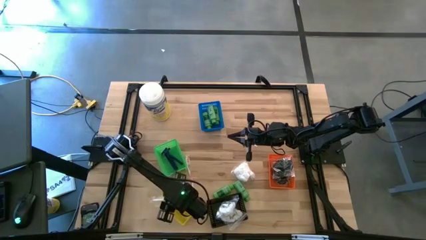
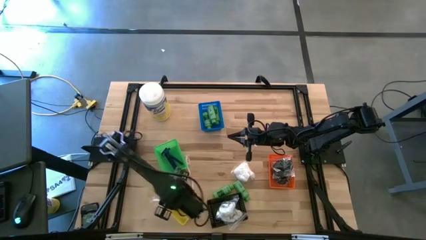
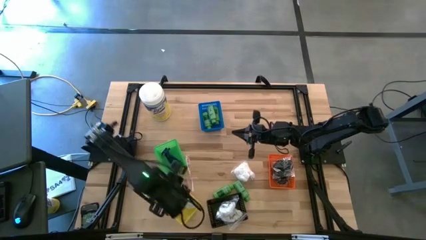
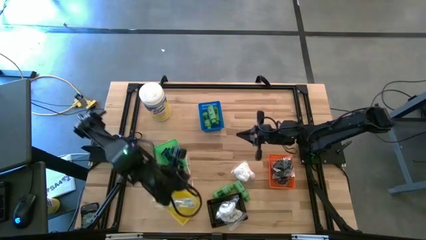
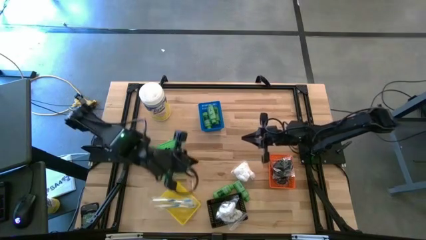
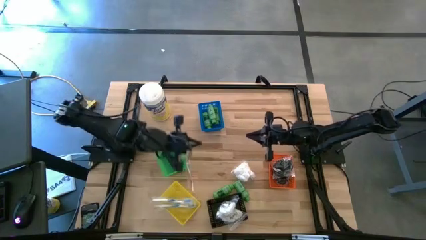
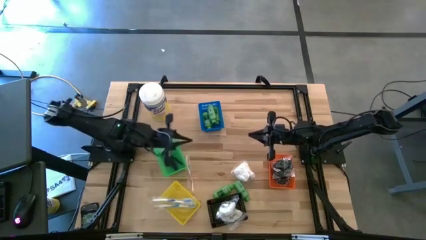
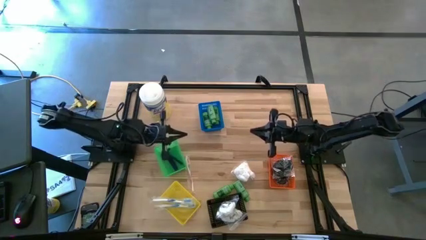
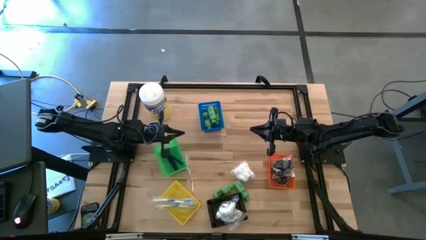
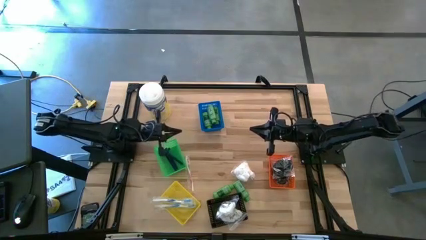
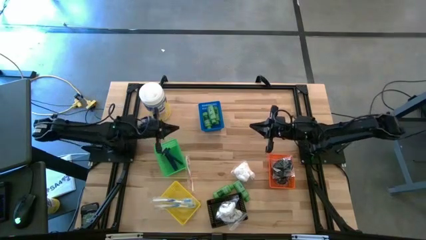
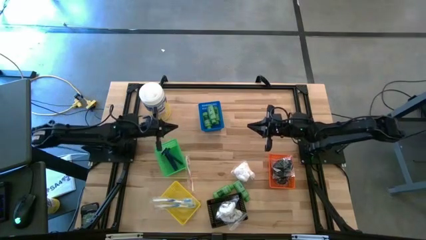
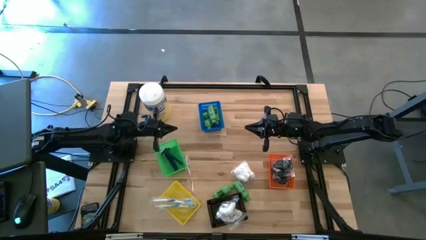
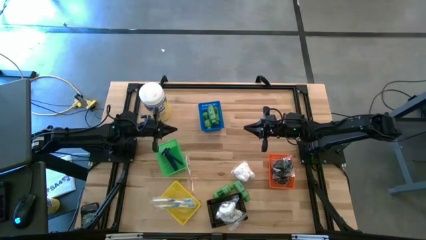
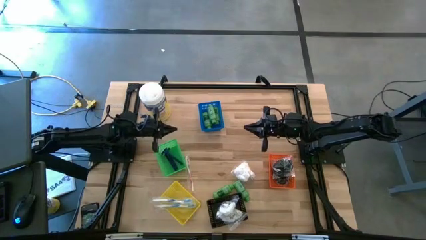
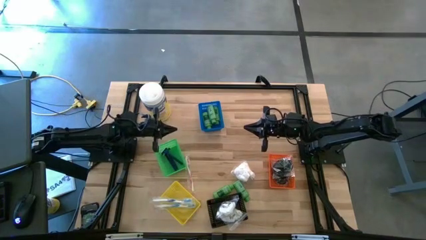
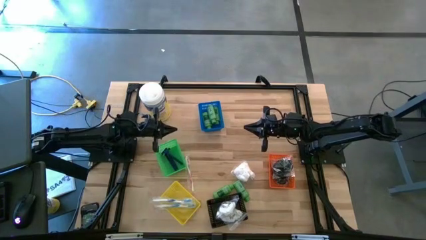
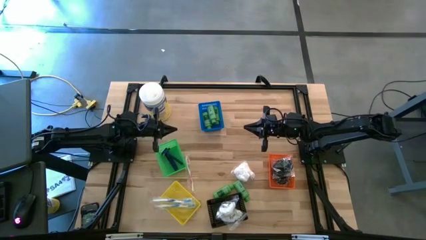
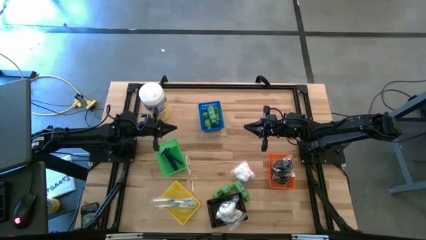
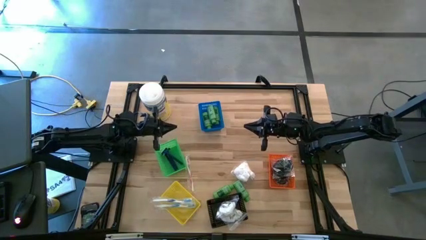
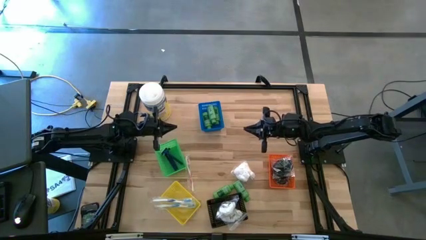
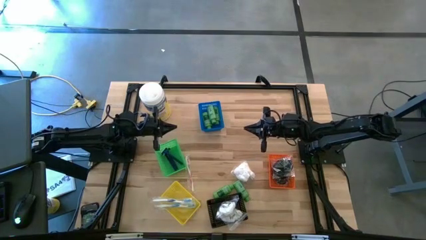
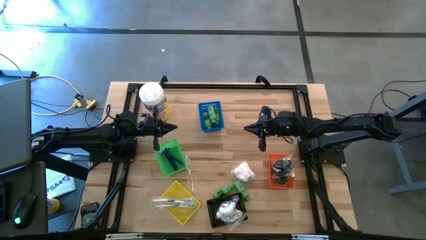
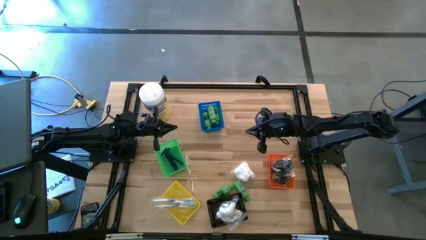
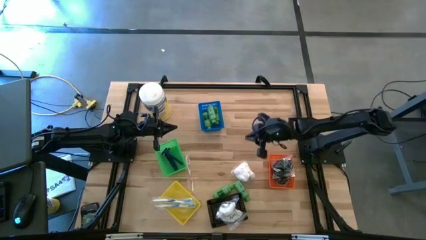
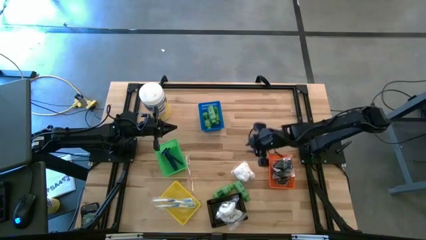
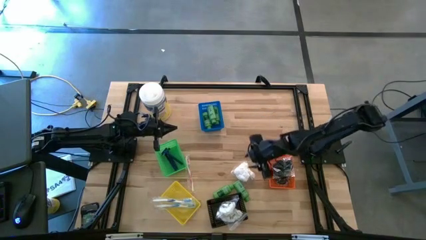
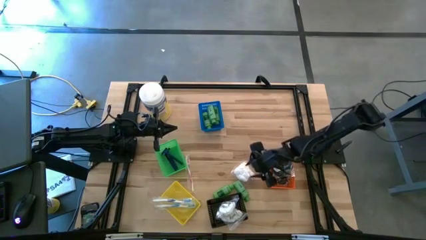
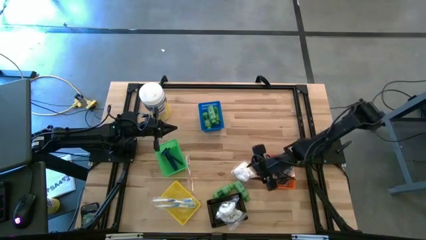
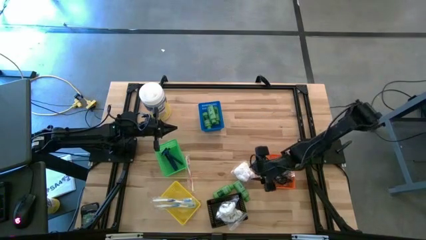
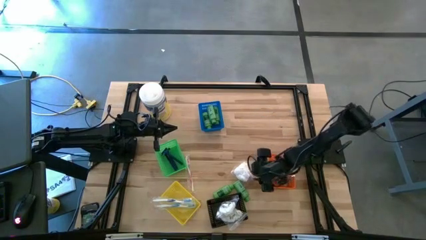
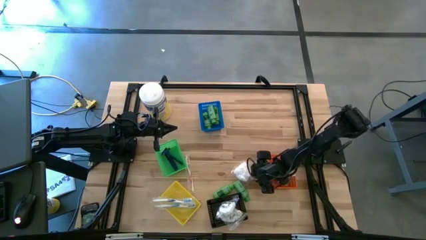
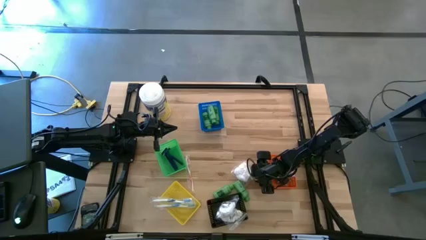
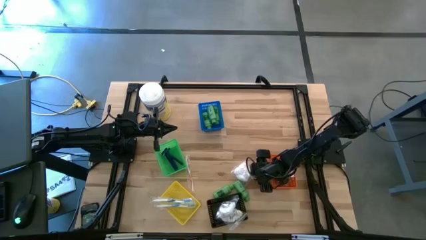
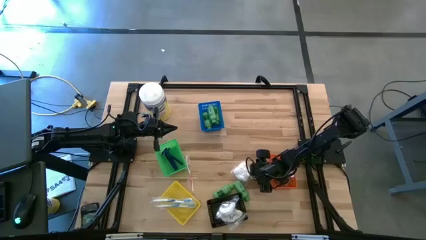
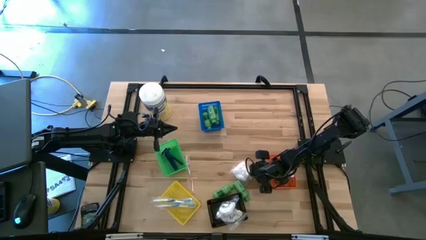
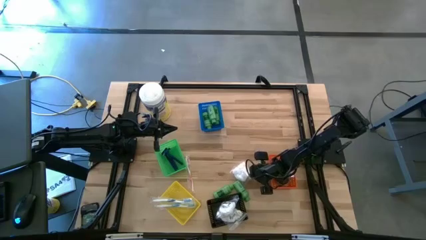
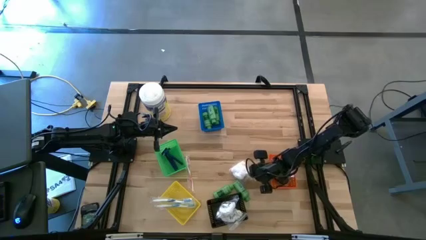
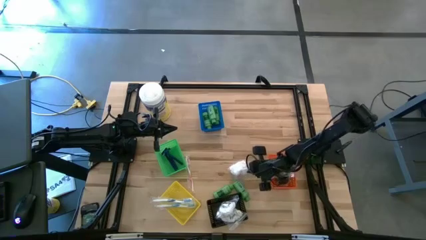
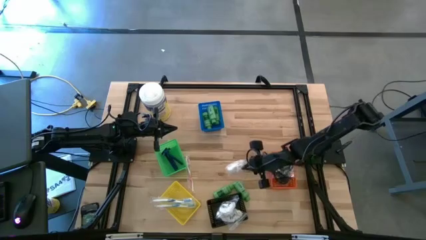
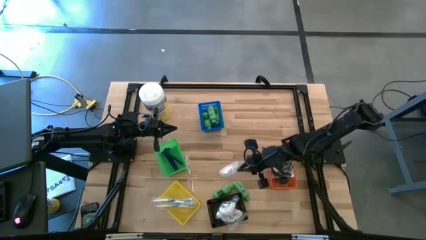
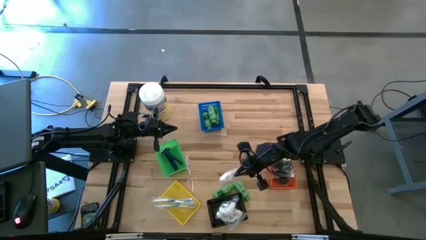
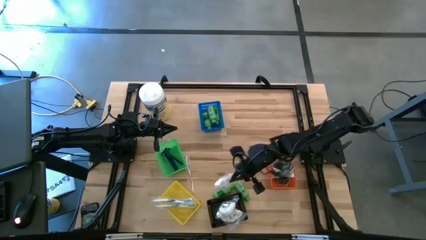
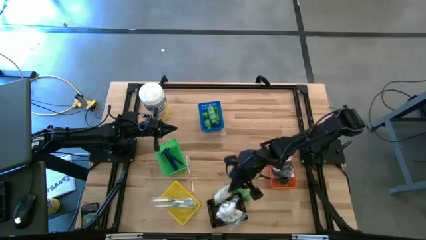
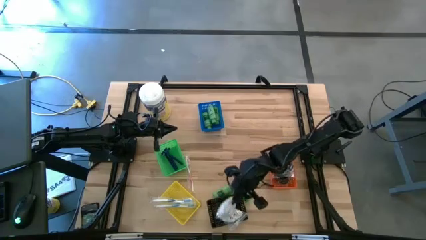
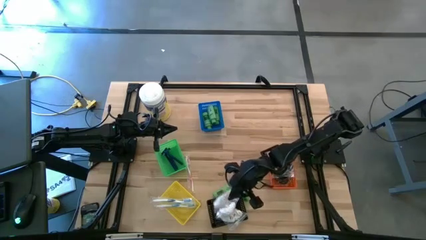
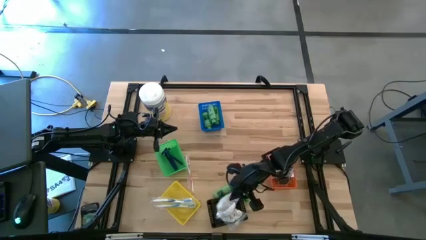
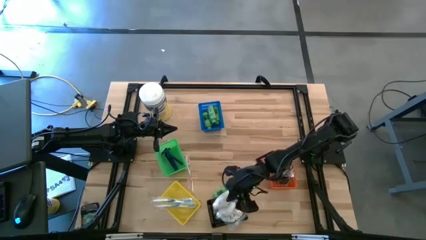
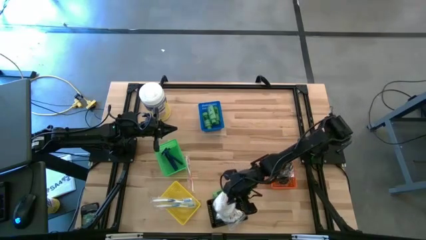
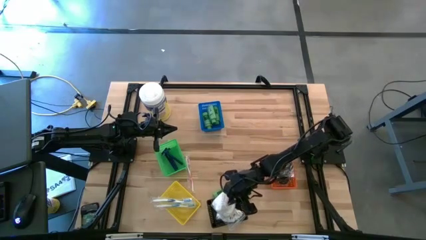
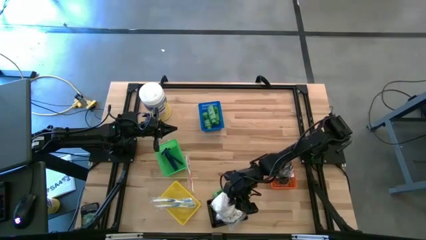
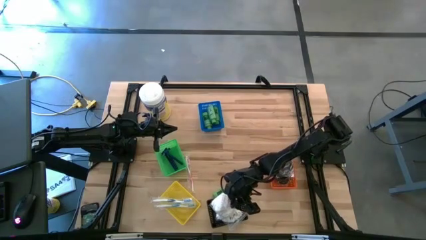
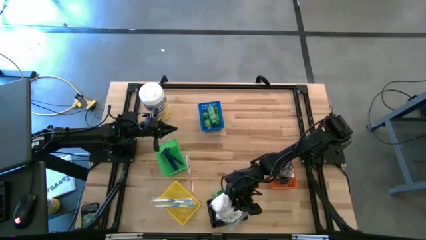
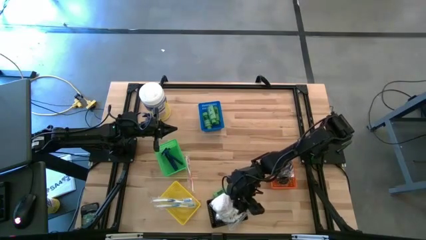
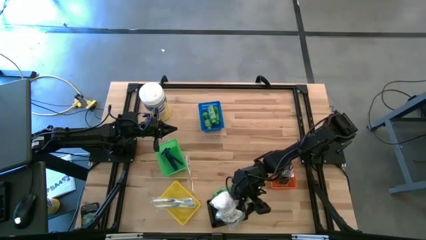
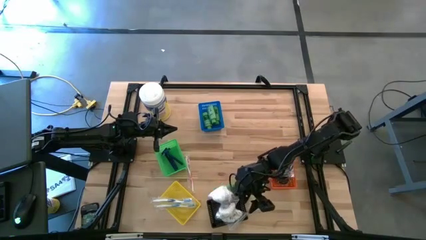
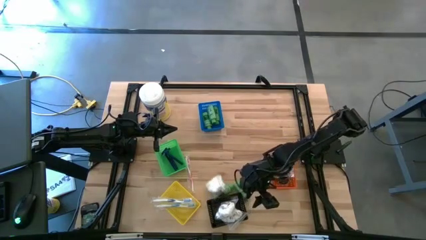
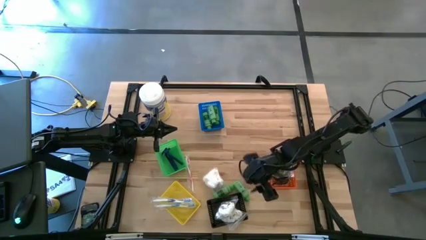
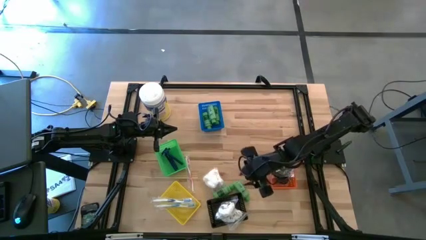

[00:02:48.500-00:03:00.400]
Task: Pick & Place Travel size toiletries
Put the cotton pack into the black bin

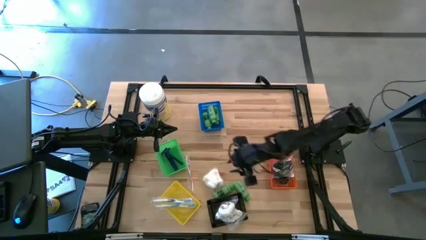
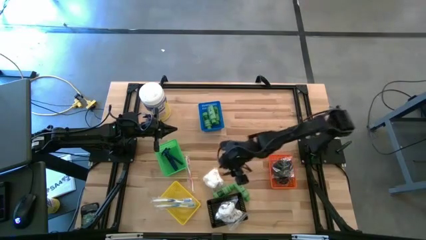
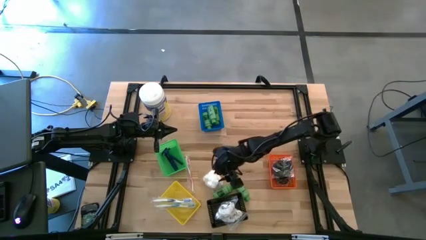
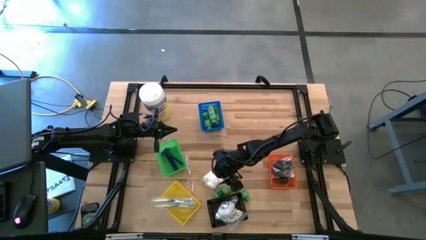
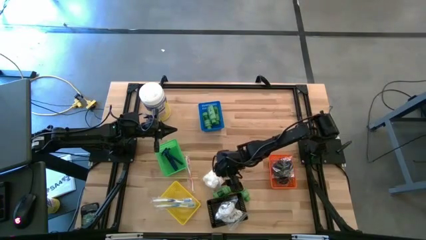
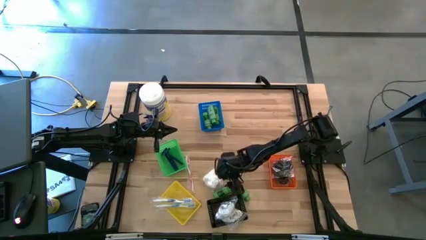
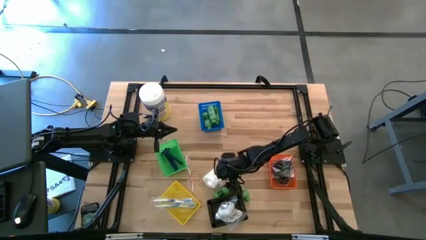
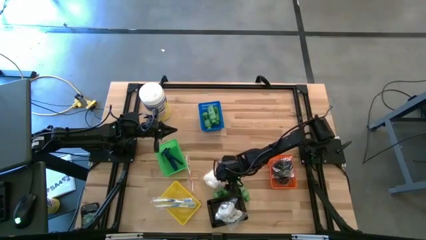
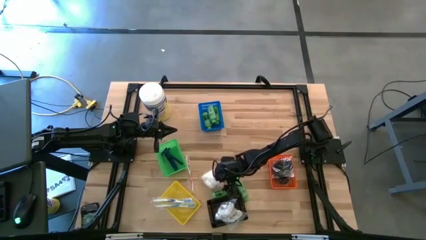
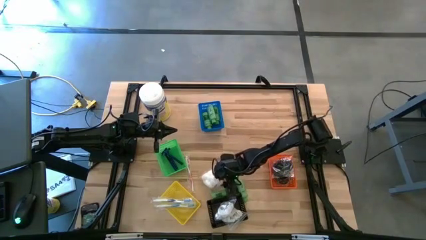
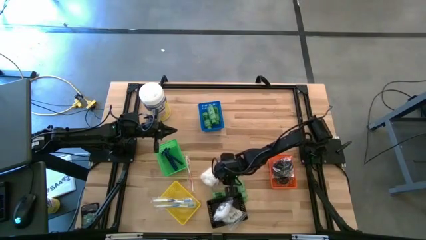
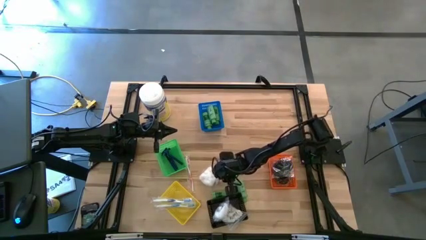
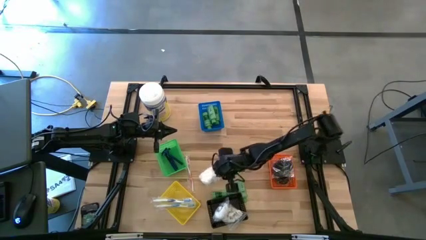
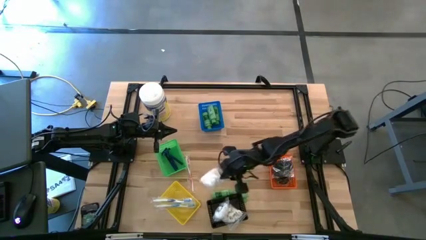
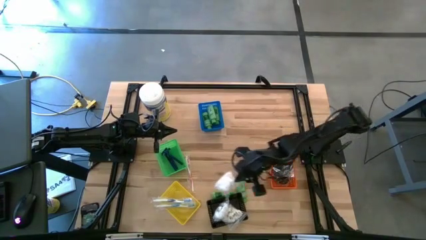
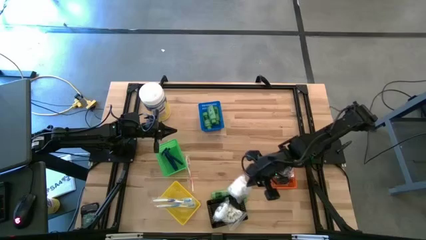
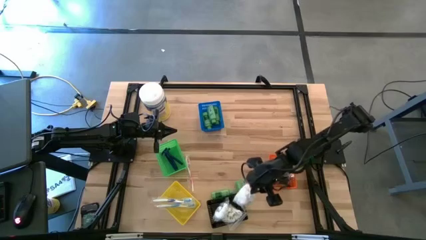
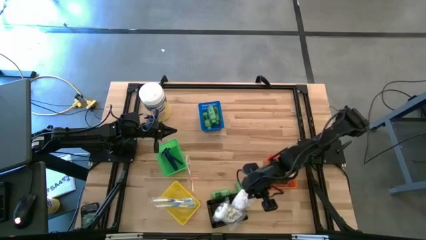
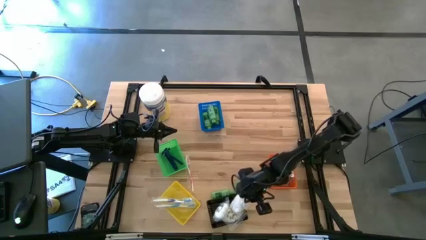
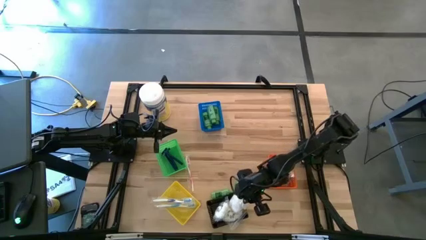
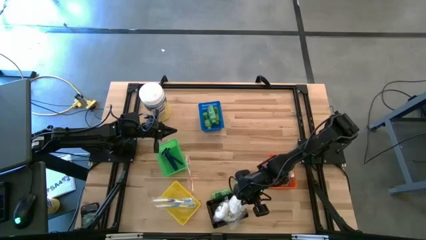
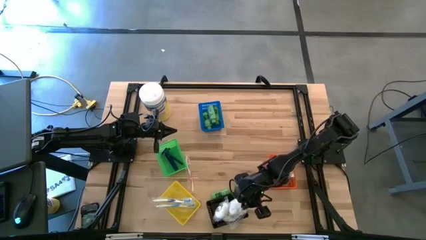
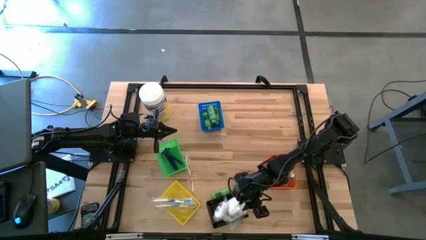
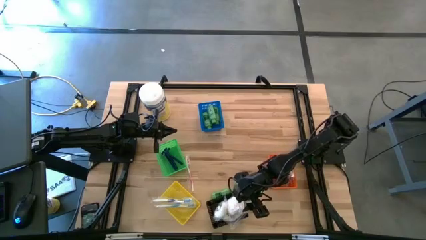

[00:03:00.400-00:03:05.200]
Put the cotton pack into the black bin
